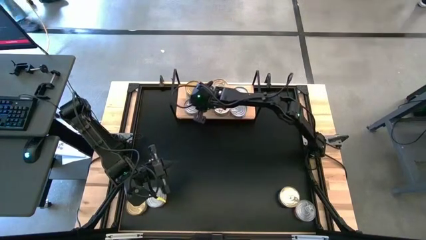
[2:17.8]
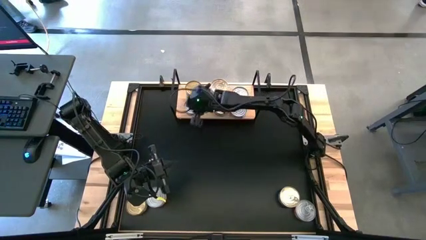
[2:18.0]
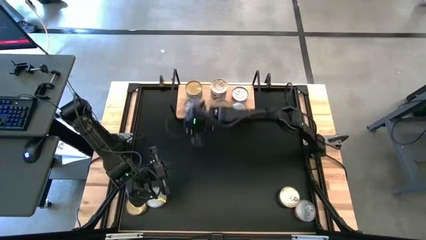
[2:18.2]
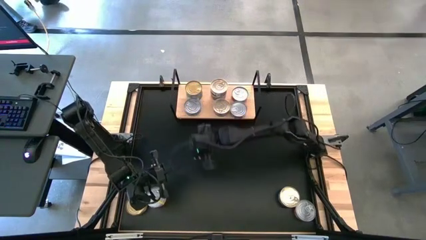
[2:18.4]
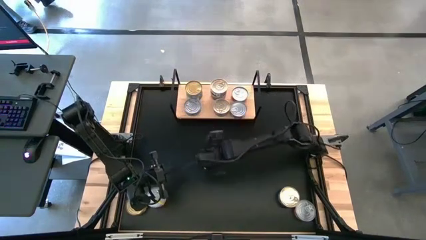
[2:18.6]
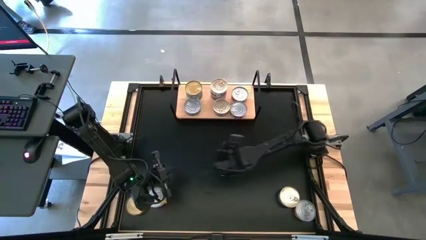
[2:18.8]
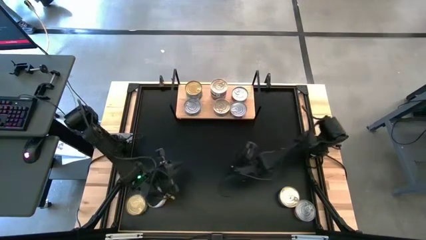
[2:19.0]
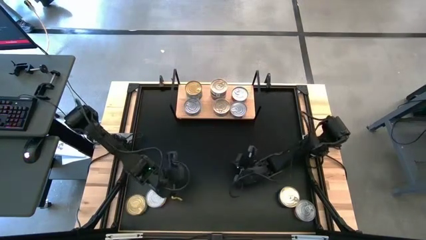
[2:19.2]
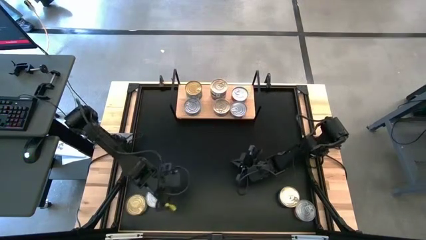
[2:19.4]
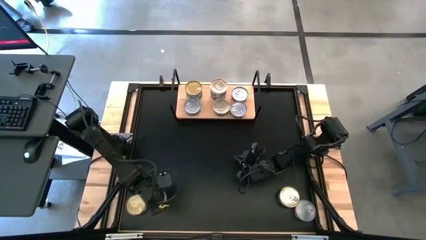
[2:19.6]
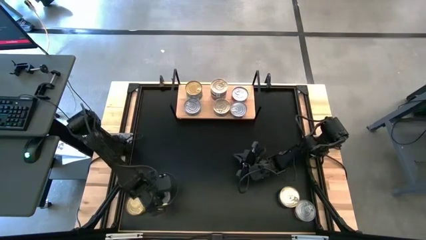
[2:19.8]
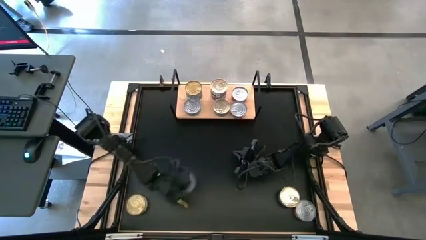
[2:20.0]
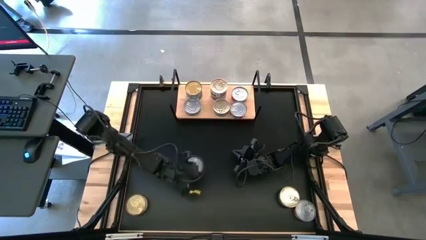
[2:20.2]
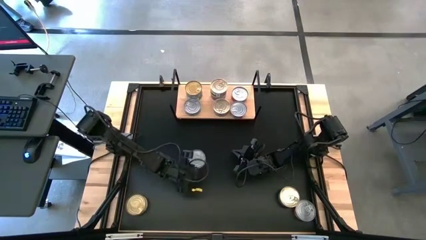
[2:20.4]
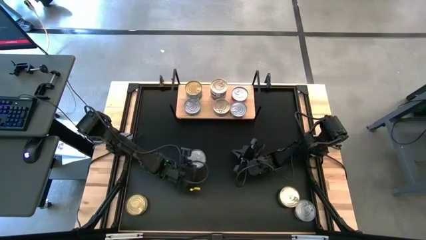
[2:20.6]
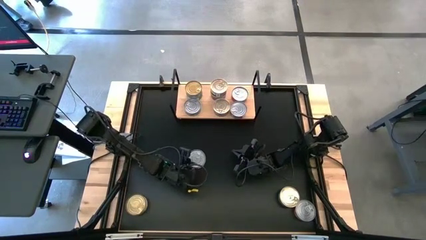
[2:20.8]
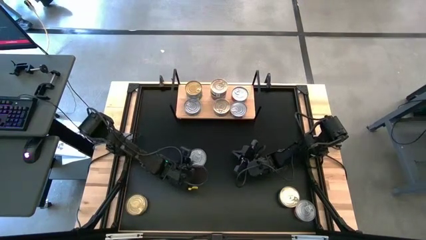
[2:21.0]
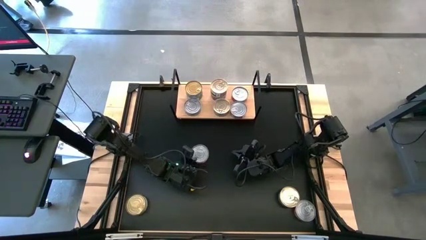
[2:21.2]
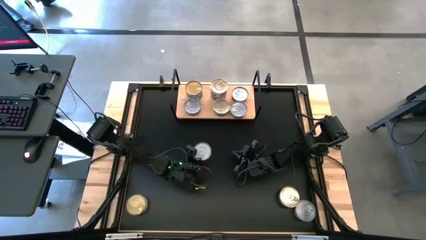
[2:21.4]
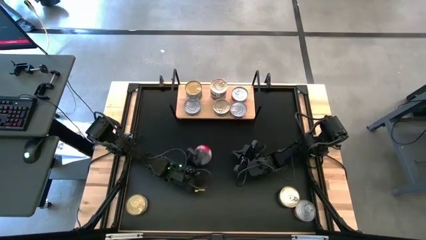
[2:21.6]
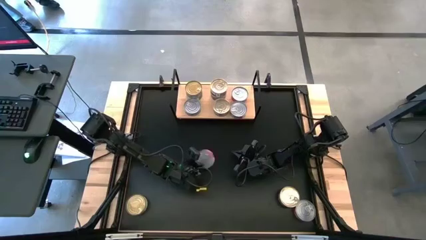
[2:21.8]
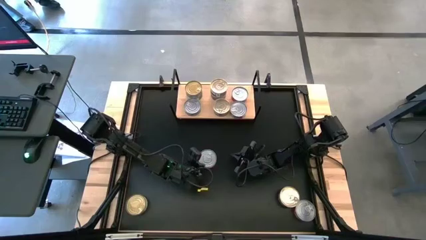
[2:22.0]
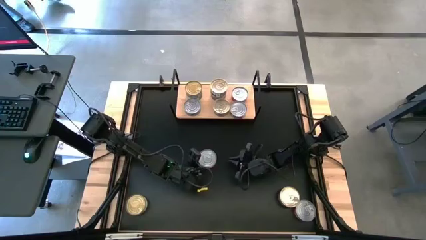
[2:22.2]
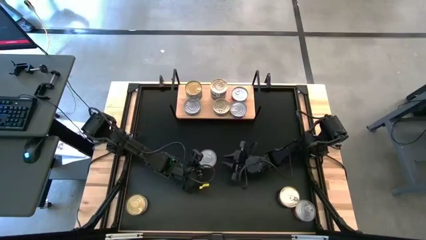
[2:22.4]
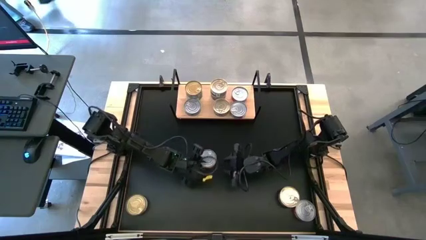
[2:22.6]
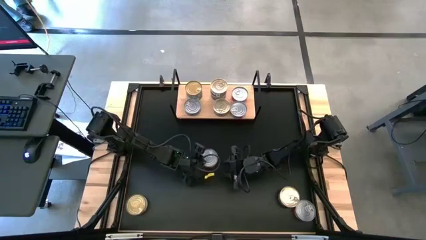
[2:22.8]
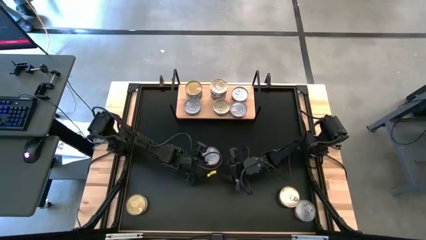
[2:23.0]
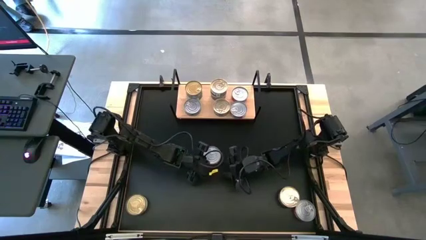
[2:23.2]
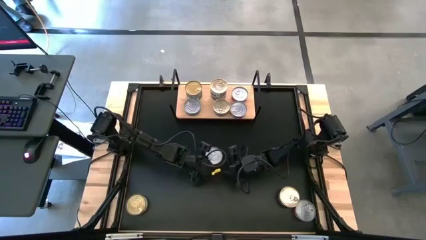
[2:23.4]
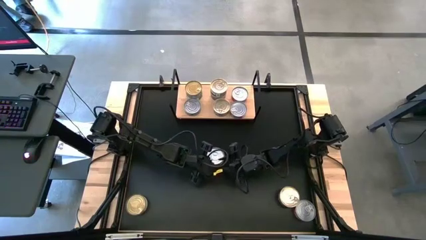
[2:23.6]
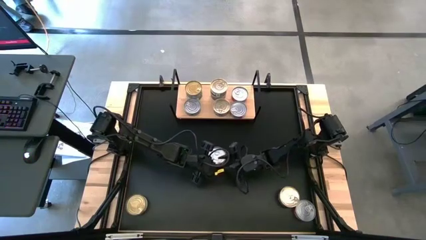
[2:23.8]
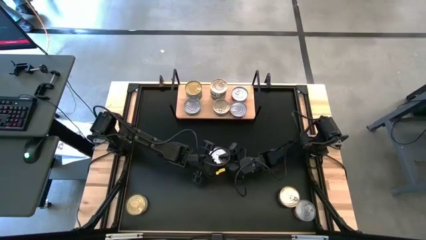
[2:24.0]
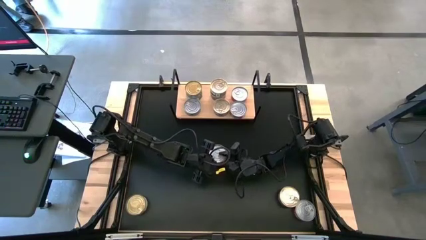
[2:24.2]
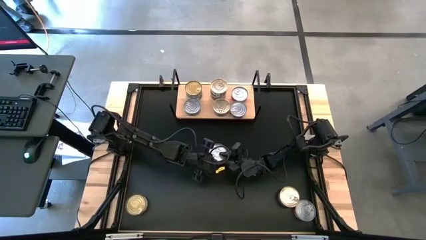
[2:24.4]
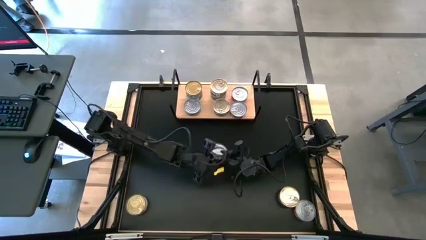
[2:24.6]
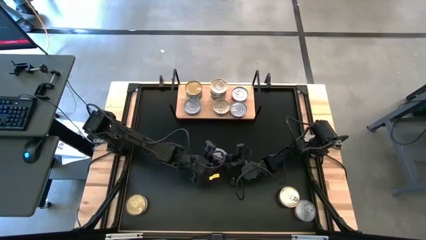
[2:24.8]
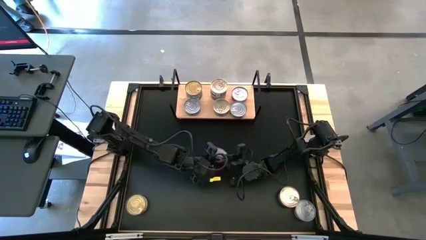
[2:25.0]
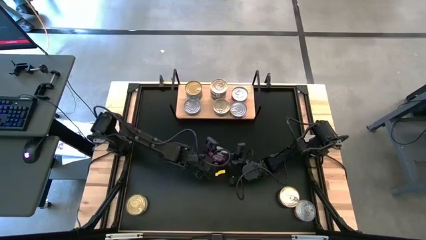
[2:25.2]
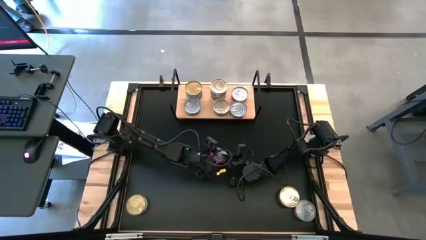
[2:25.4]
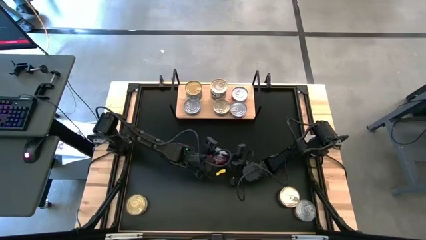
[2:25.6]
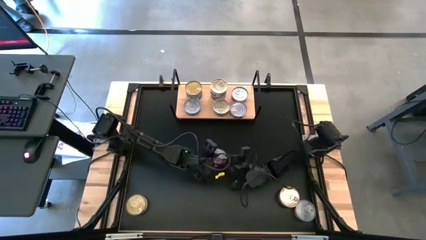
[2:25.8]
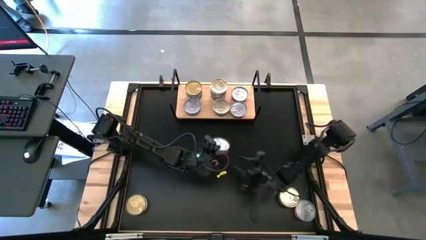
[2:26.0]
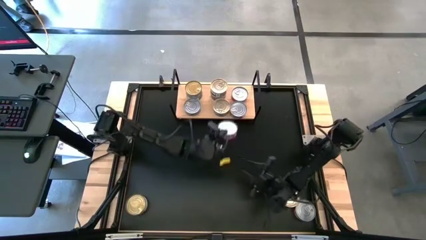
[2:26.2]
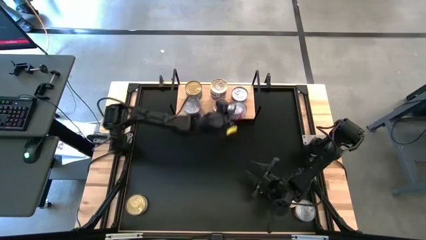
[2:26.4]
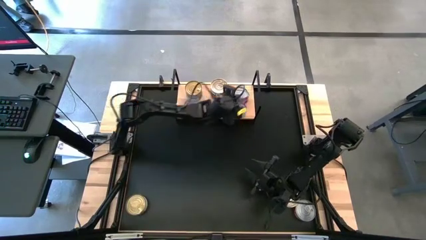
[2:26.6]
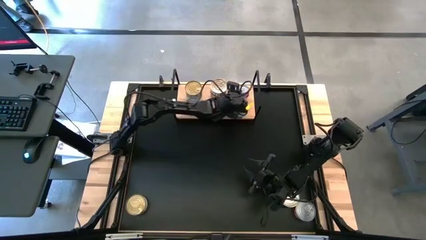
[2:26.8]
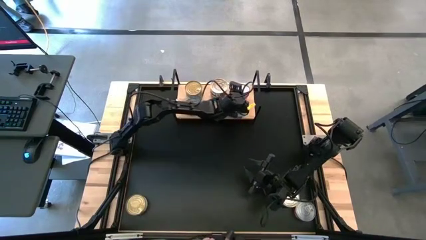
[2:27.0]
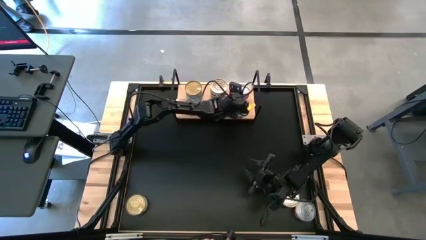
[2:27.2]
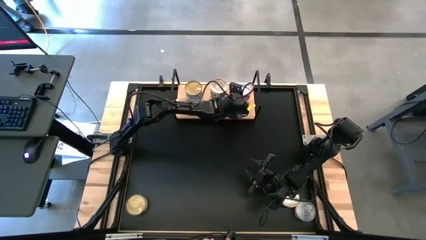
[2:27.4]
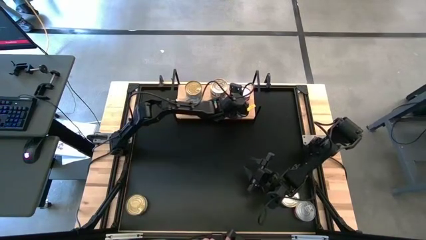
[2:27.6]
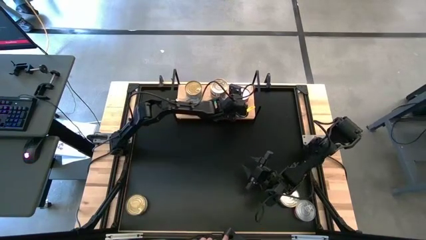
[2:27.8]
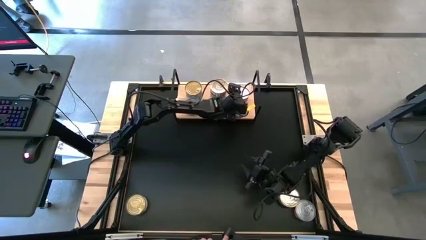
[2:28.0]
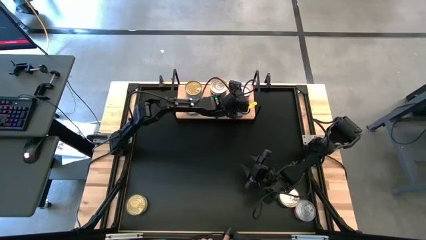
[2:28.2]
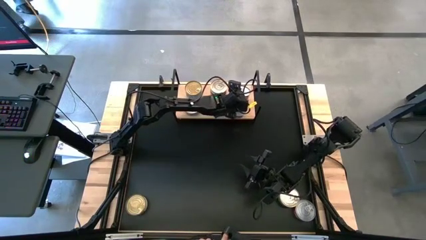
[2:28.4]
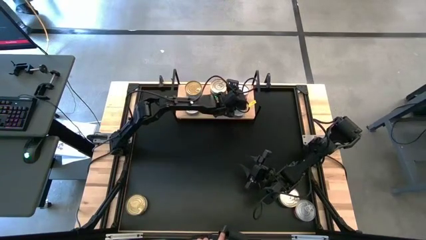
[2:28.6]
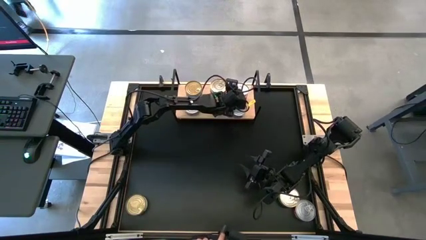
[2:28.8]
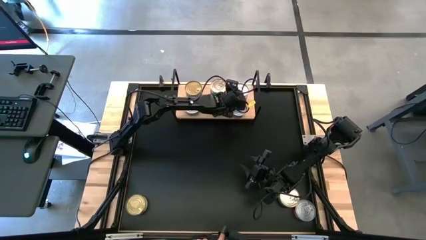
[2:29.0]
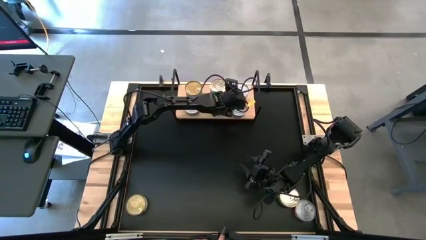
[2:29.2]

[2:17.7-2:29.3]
Task: Stack canned seafood by type on shelf
Stack the red tuna can on top of the red tuna can on the shelf

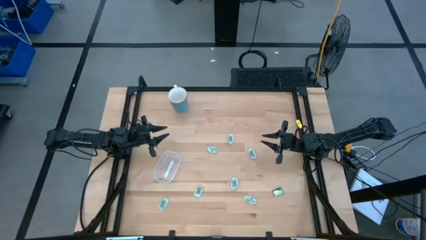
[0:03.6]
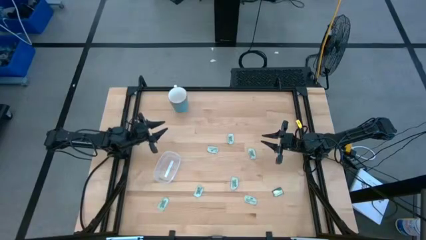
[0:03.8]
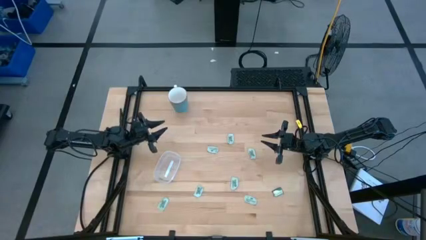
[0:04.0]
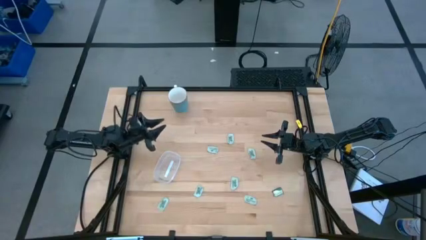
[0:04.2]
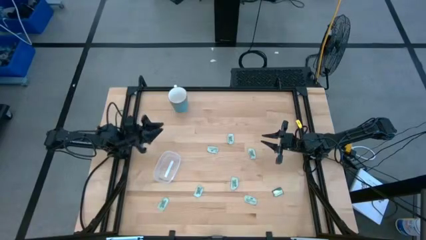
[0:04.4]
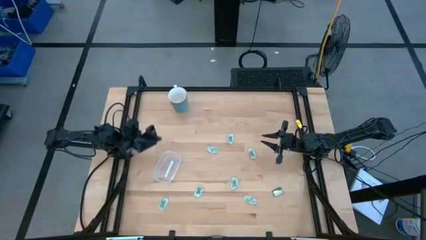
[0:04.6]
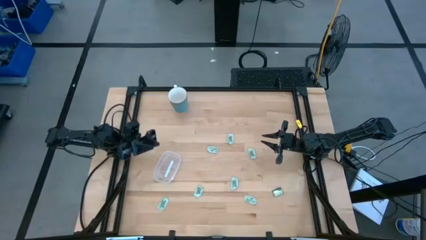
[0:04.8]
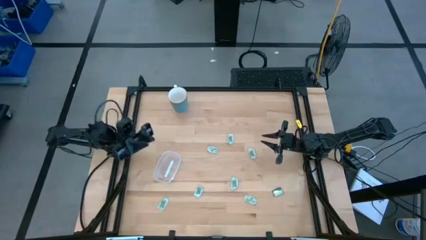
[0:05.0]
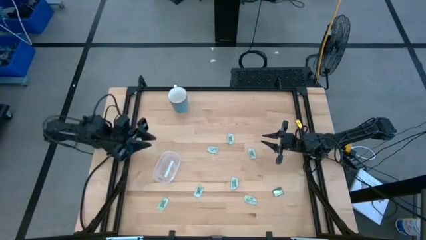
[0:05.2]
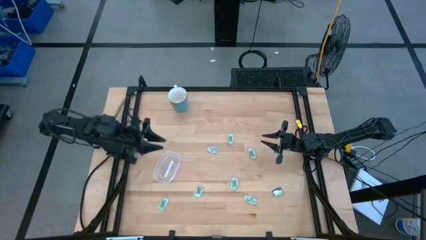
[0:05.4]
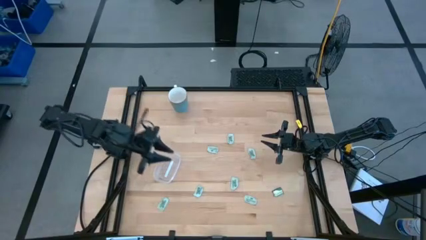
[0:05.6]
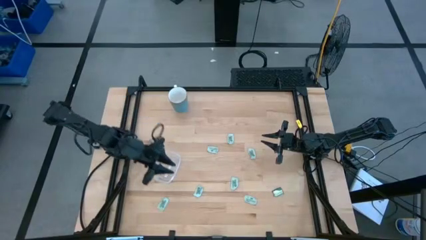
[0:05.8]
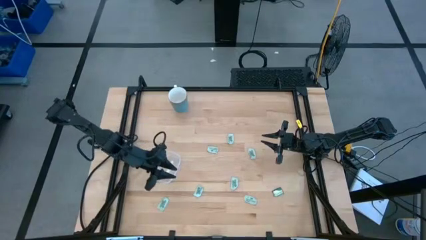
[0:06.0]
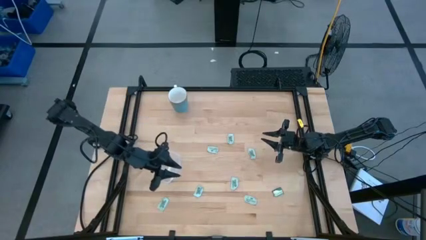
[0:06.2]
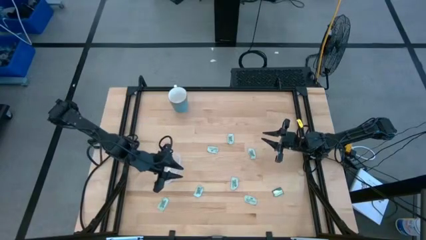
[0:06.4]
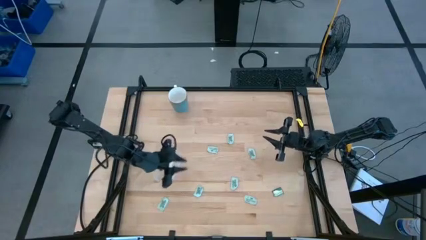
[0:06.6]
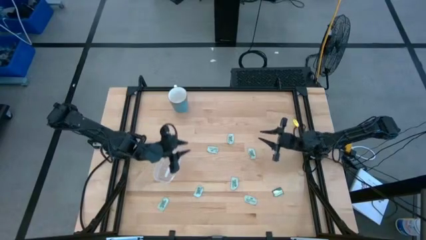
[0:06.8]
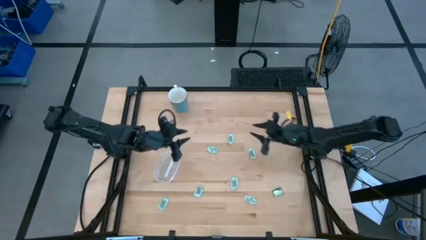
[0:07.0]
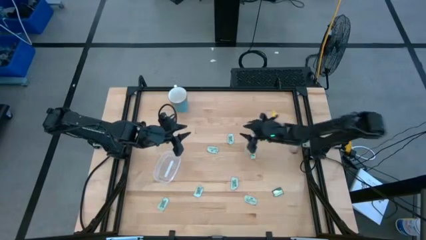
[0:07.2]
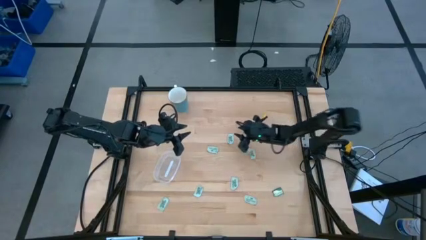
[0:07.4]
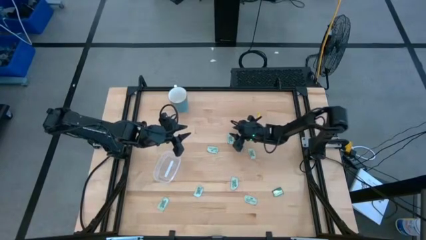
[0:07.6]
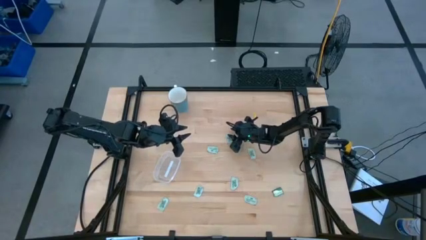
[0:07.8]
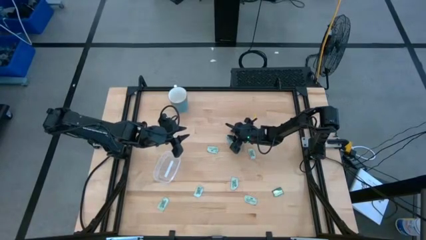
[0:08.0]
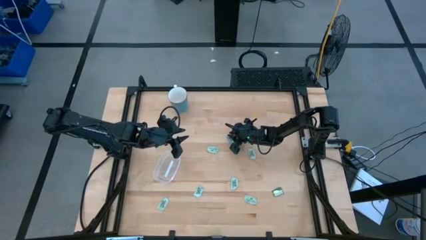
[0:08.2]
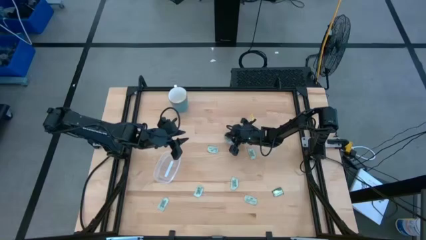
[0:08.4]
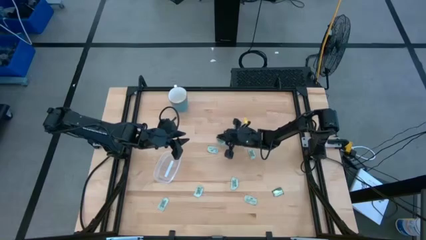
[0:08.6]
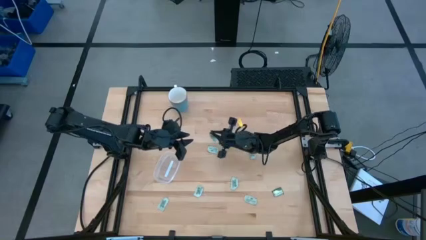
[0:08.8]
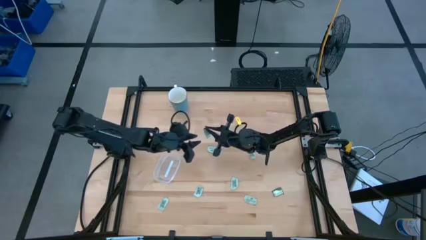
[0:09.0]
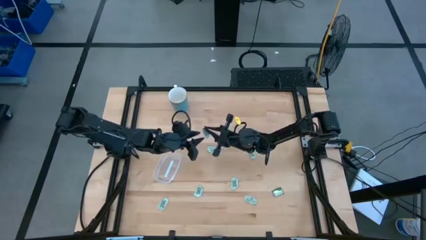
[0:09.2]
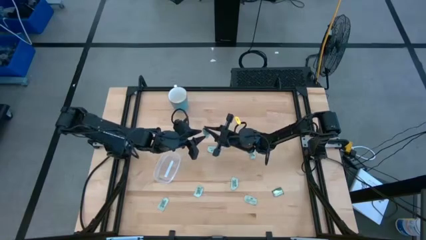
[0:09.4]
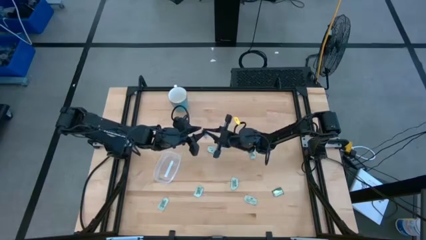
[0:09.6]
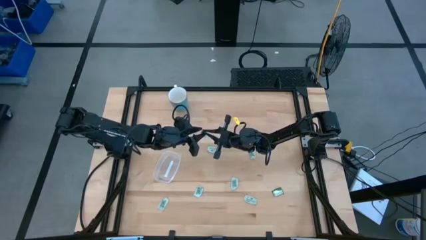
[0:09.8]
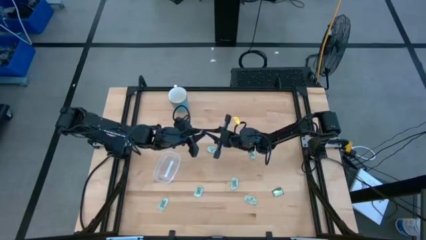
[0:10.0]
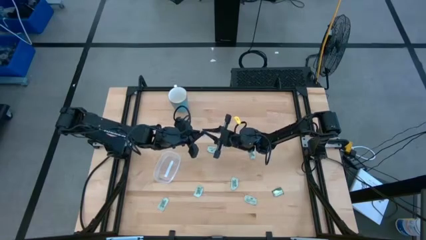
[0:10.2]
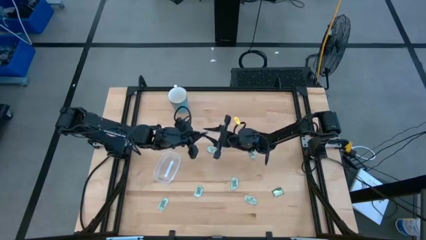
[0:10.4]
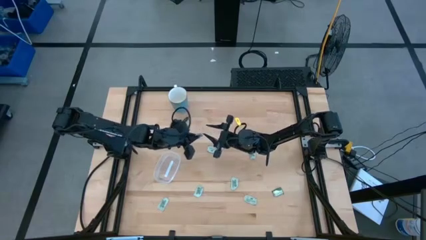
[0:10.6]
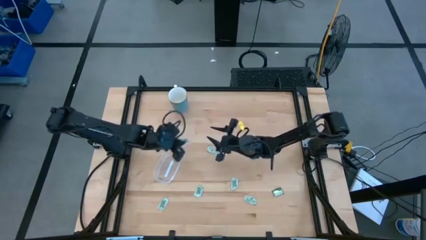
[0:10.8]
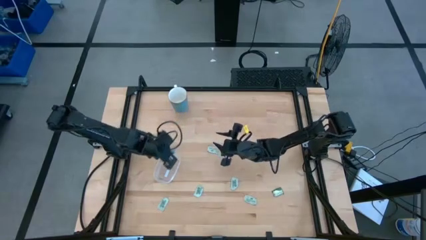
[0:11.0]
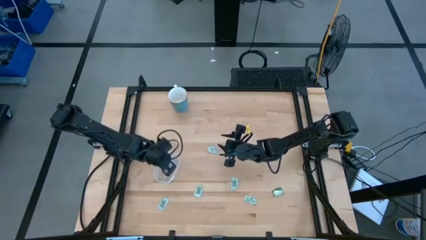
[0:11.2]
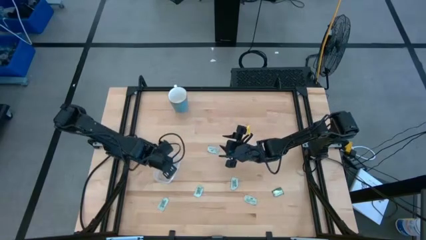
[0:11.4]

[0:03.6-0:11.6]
Task: Pick and place Stevia / Truvia into bins
Put the stevia packet into the transparent container
